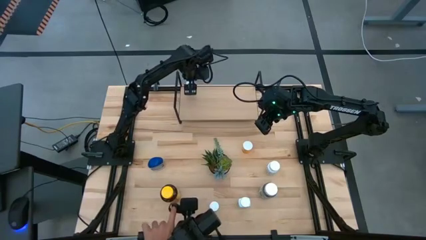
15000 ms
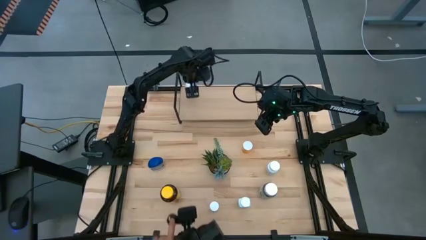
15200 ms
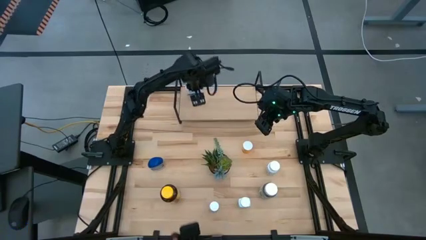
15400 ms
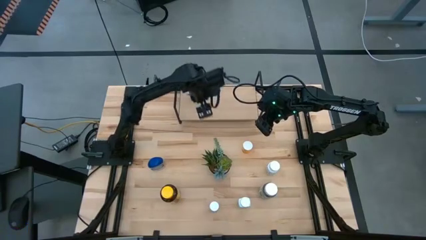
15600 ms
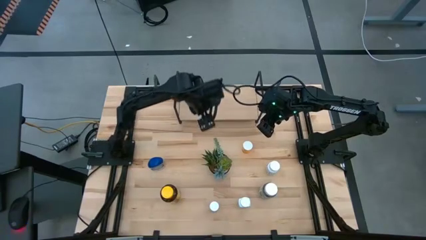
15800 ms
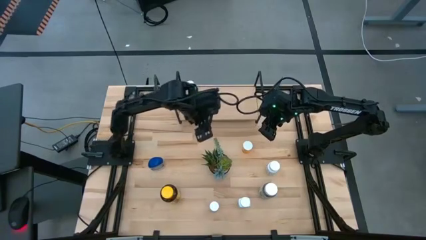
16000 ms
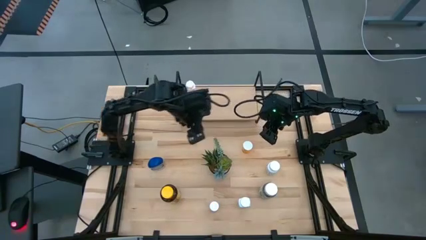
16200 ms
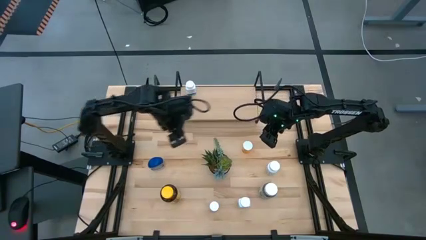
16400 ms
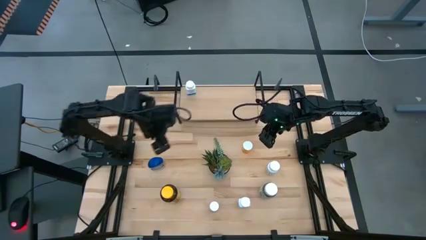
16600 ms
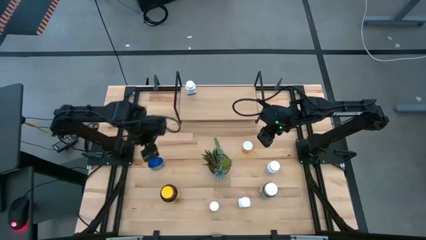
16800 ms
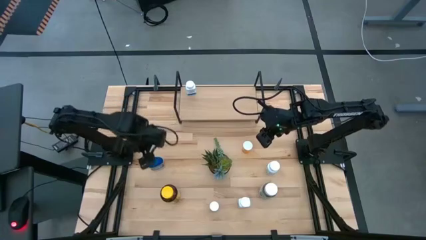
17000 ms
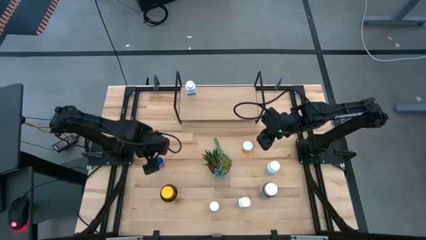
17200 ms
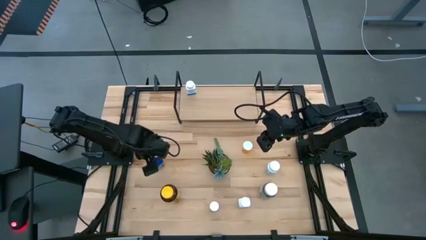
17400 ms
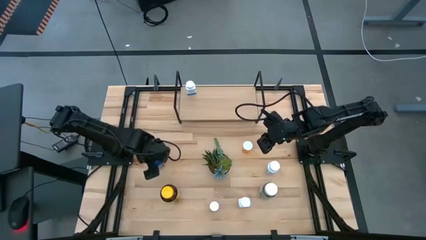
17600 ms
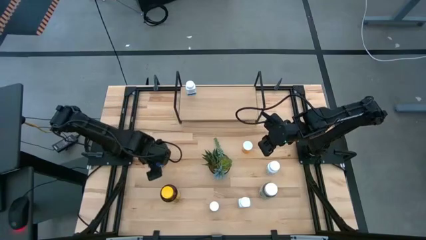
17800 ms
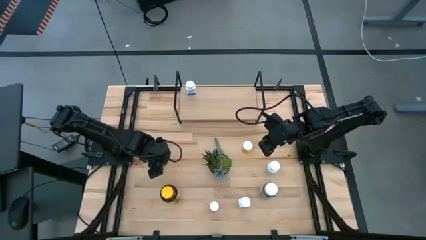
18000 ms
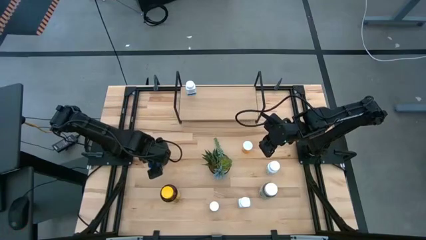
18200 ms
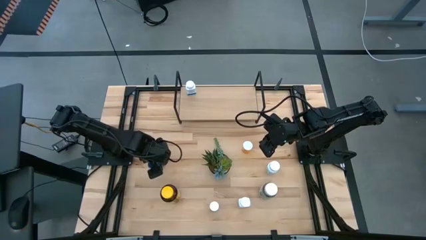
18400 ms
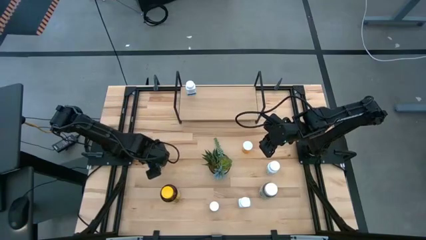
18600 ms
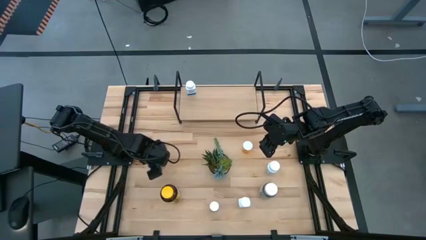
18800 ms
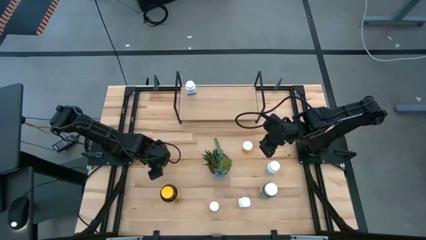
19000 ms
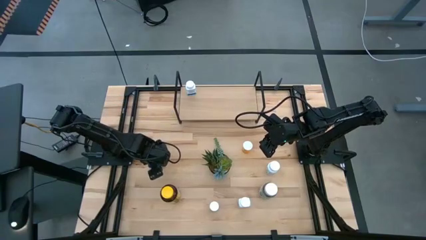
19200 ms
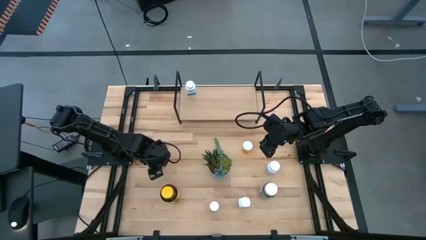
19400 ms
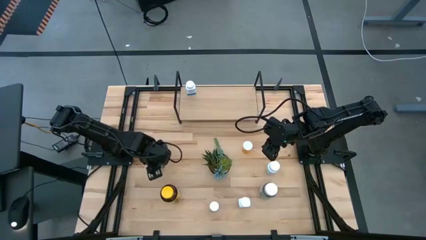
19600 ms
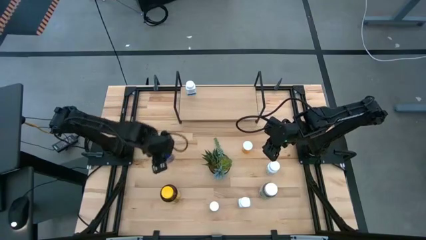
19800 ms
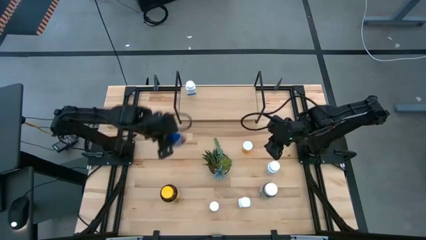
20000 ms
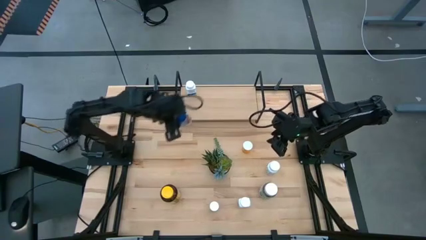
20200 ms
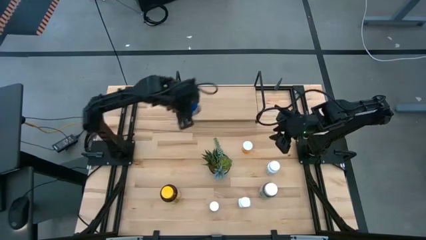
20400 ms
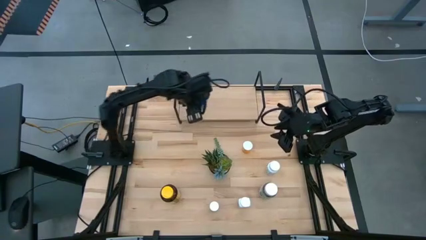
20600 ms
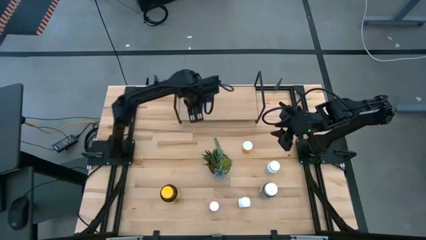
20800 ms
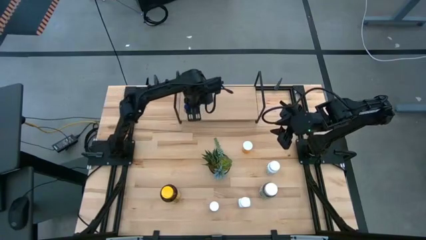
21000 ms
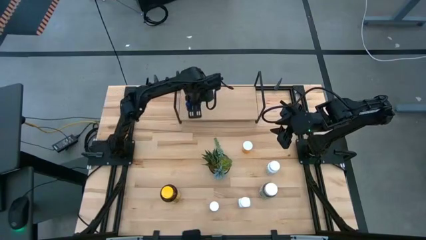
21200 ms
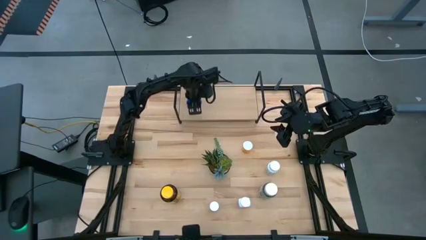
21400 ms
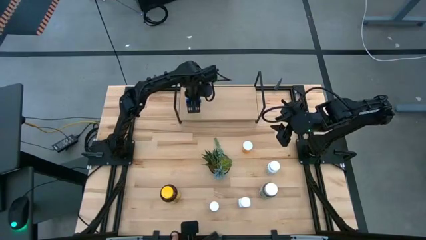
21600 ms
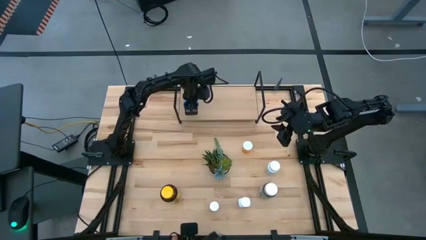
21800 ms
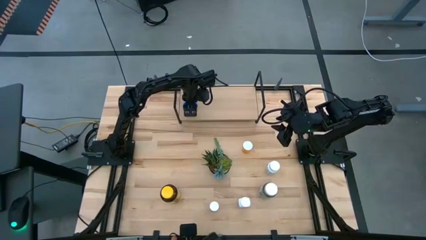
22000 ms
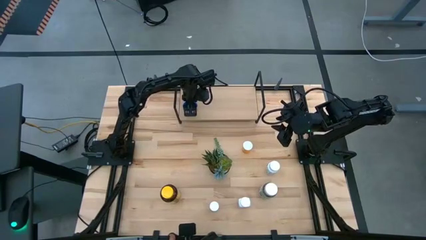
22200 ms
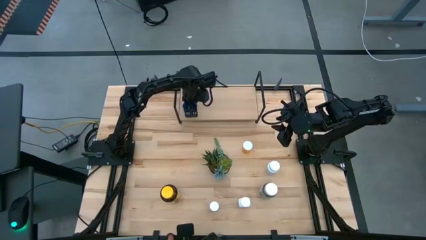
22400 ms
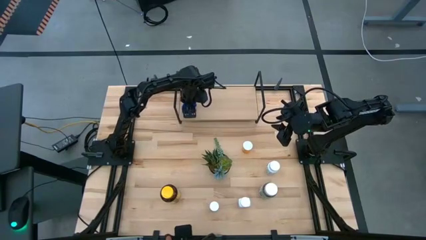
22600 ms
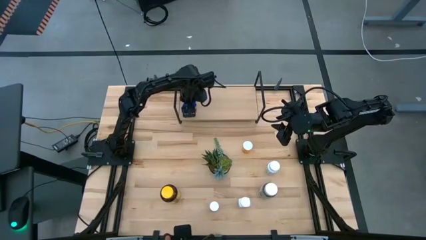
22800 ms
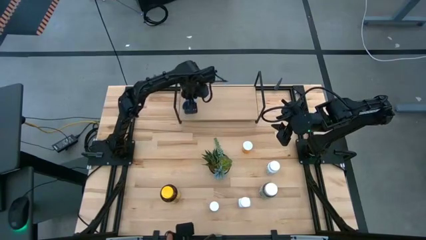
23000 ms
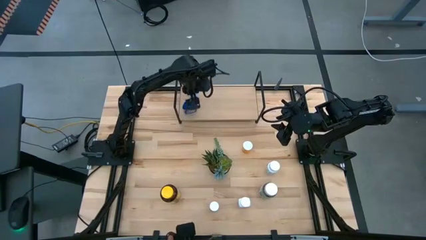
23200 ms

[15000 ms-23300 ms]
Task: Pick and place medicine bottles onto shelf by color
Put the blue pill bottle on the shelf

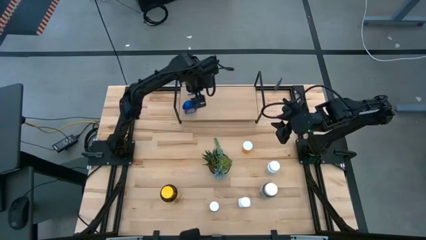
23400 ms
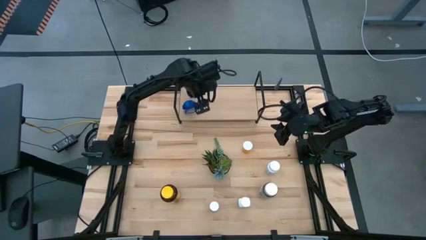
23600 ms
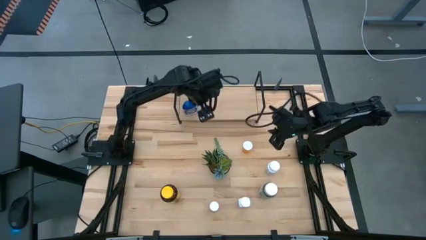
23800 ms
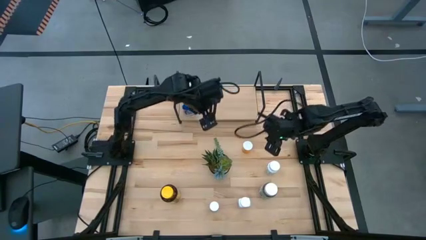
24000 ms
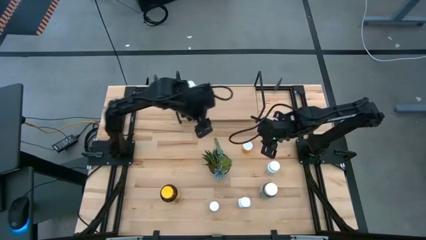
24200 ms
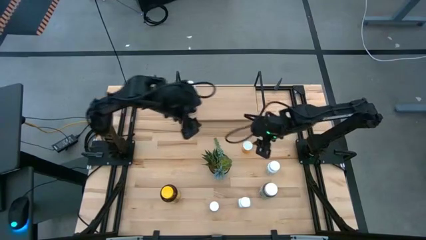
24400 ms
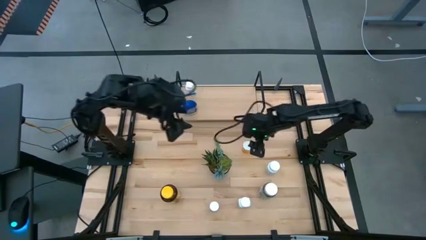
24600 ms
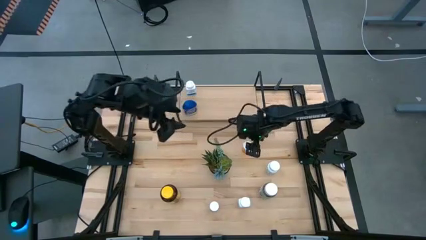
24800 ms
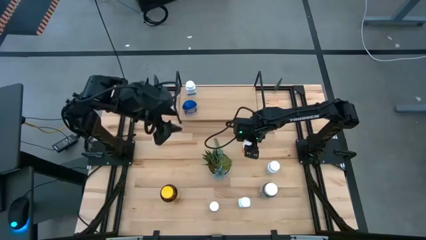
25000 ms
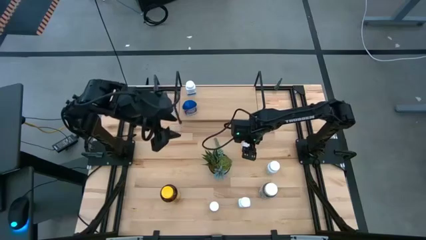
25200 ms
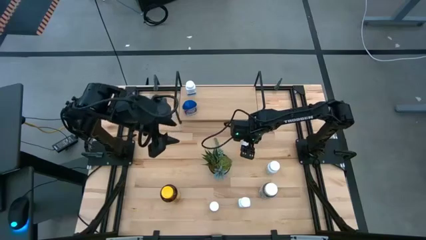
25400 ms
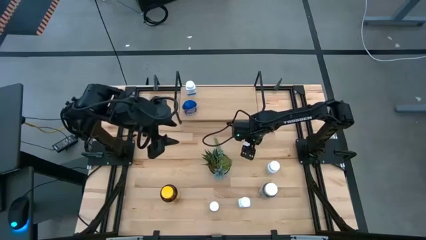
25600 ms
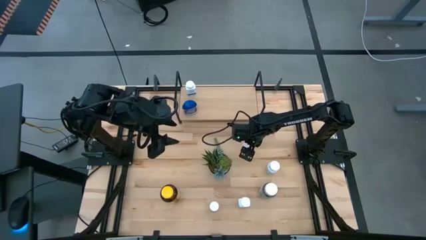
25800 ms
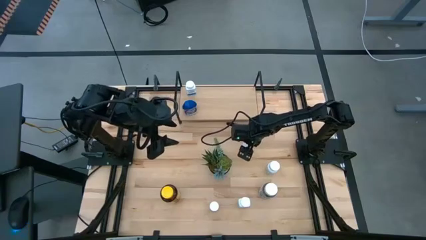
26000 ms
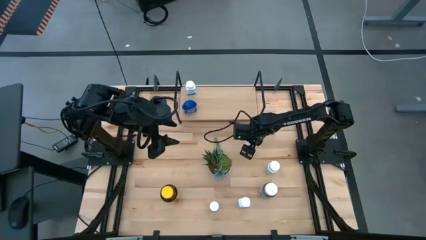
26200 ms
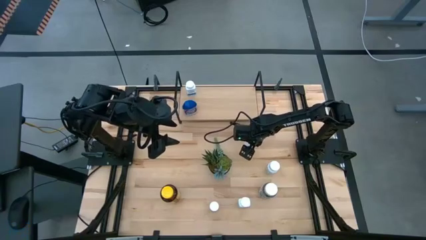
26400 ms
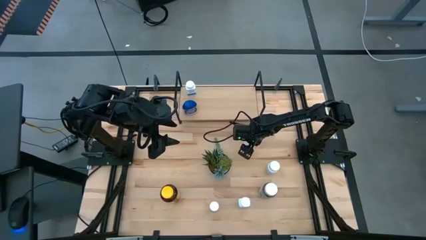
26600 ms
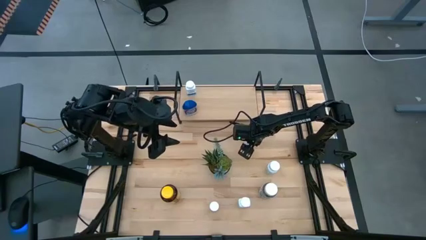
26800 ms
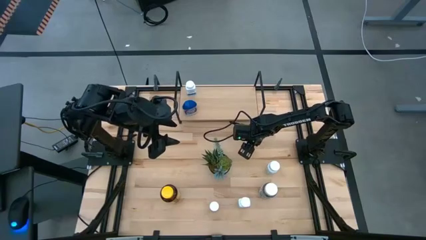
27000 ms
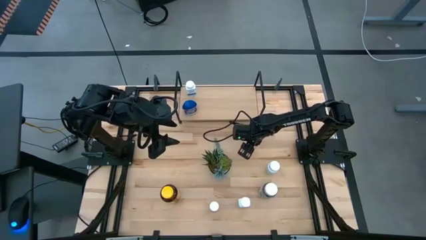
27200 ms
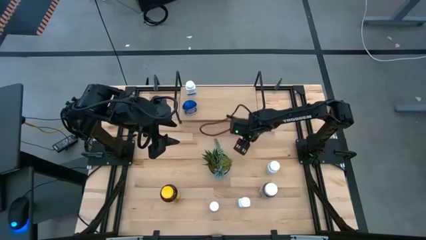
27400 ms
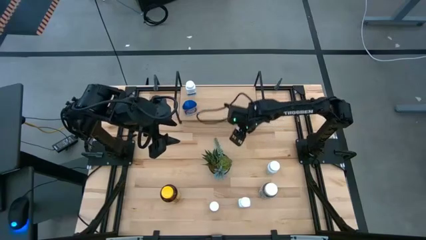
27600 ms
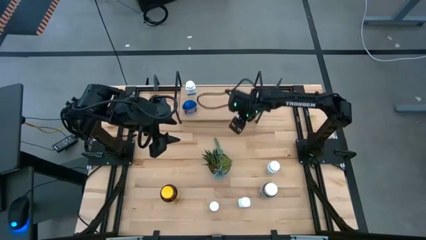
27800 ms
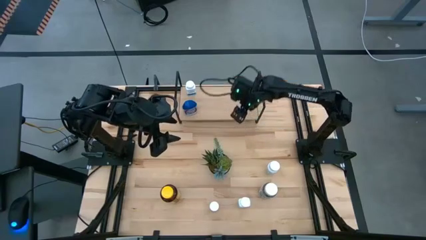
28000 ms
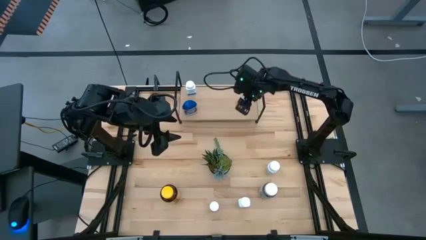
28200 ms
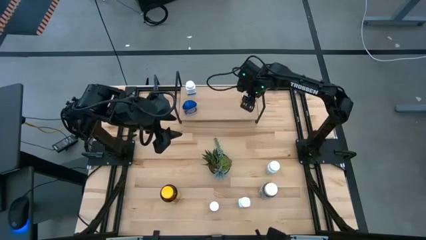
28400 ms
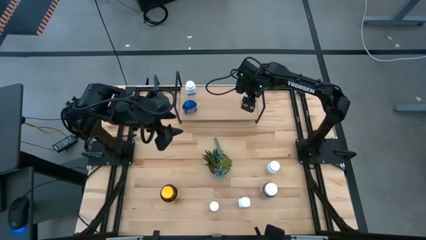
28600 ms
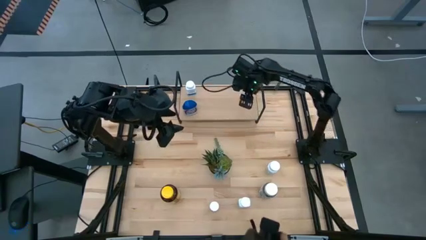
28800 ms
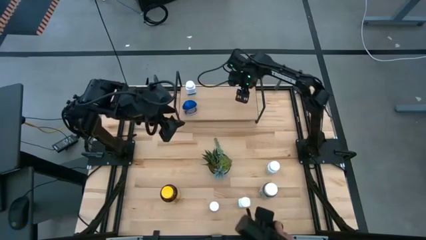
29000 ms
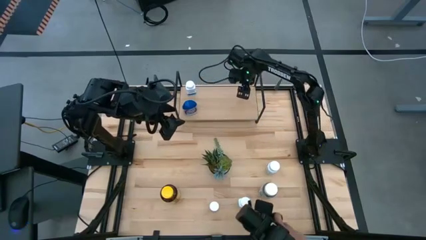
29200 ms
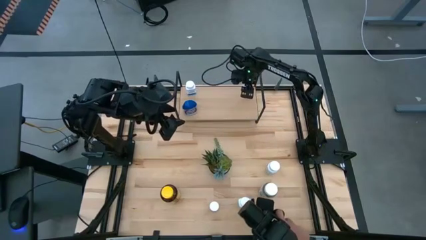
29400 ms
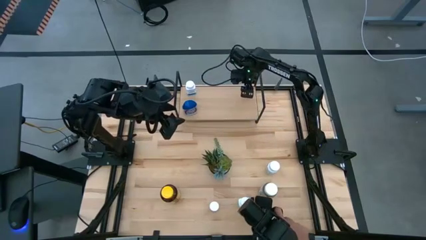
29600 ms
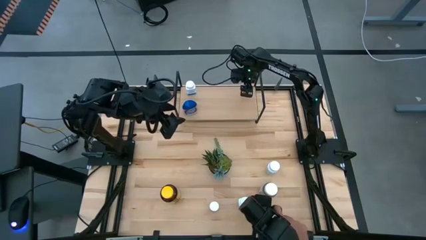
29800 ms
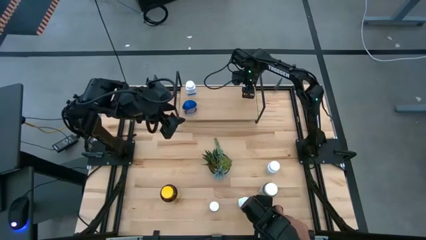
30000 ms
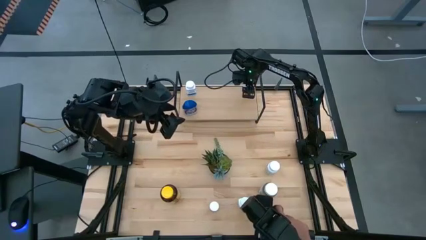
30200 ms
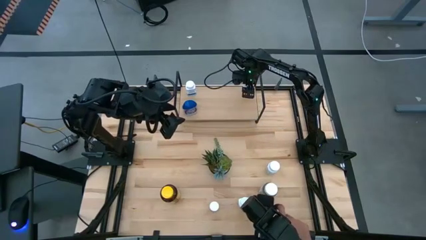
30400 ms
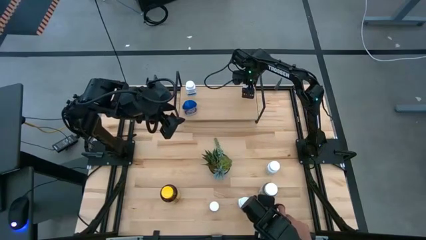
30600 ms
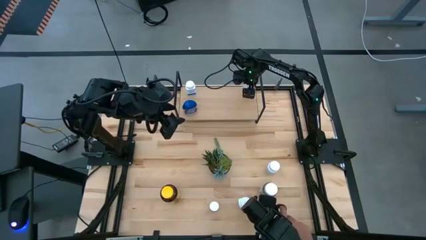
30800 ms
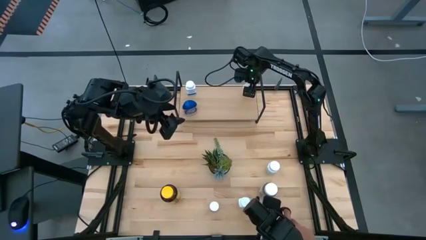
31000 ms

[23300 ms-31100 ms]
Put the orange pill bottle on the shelf
